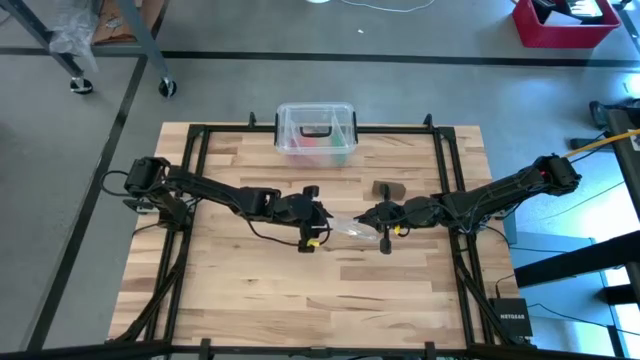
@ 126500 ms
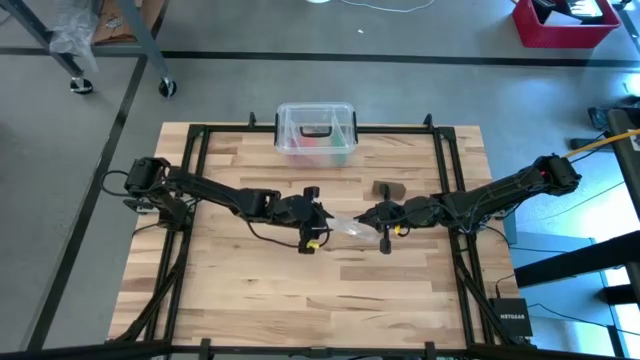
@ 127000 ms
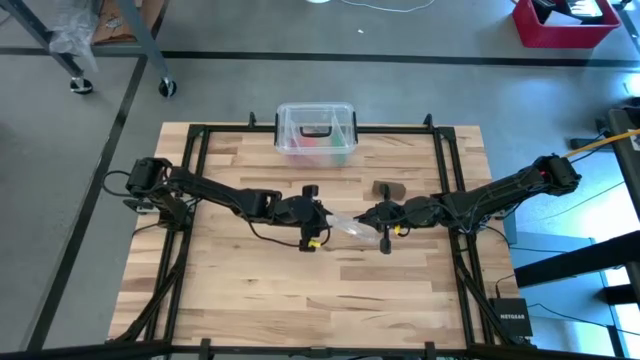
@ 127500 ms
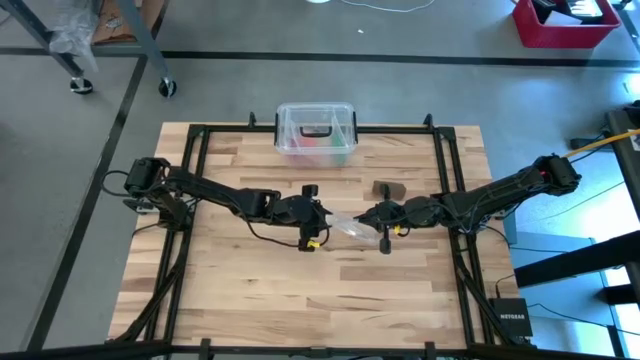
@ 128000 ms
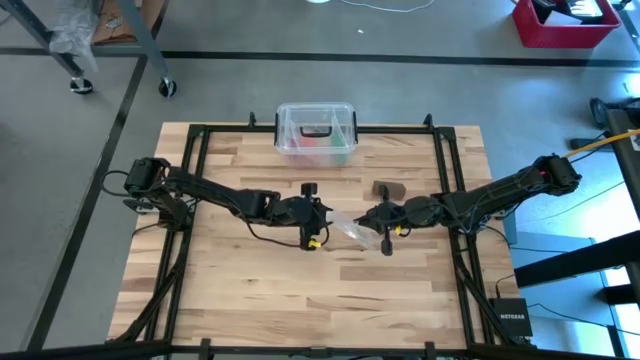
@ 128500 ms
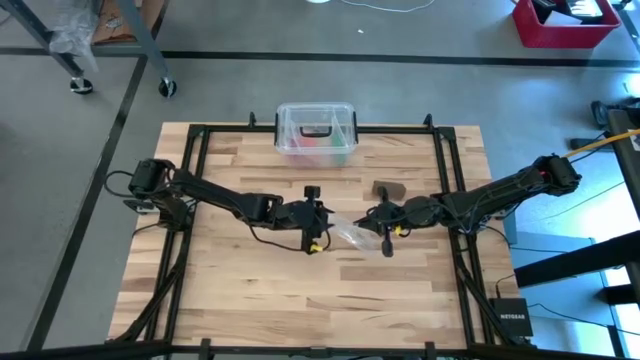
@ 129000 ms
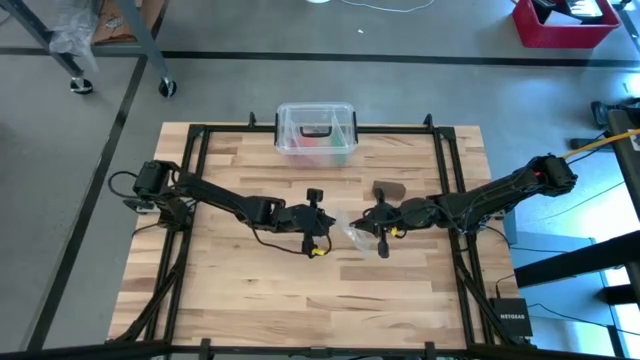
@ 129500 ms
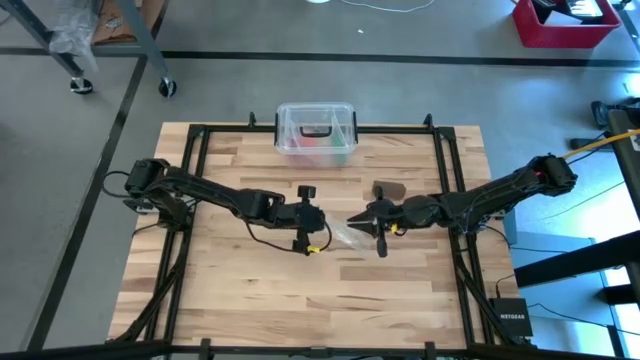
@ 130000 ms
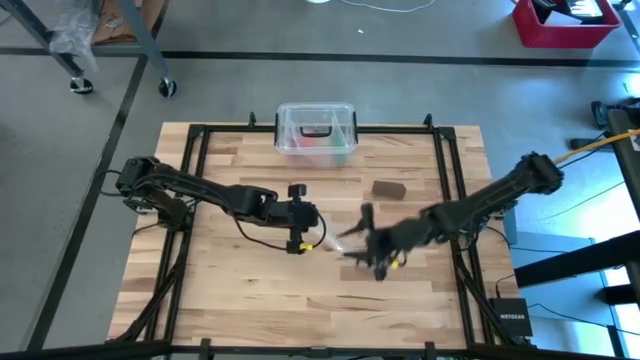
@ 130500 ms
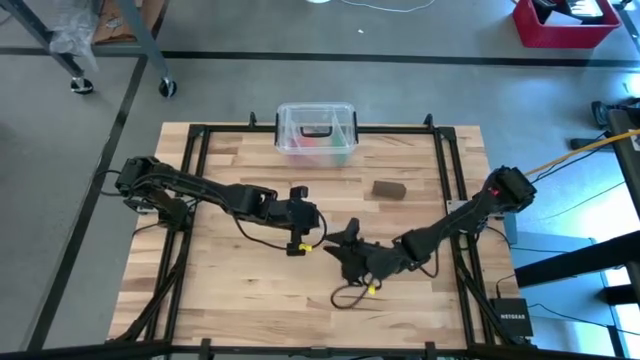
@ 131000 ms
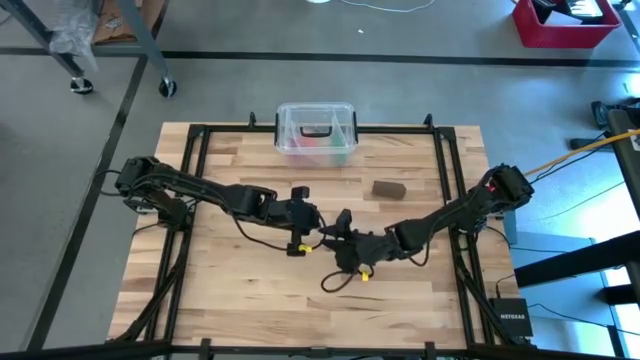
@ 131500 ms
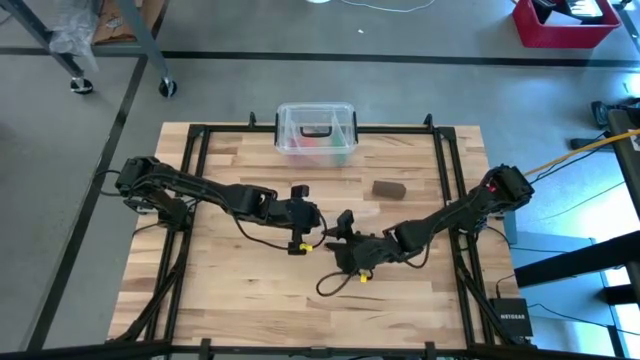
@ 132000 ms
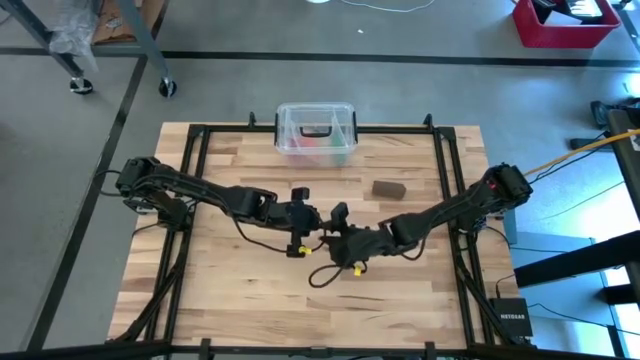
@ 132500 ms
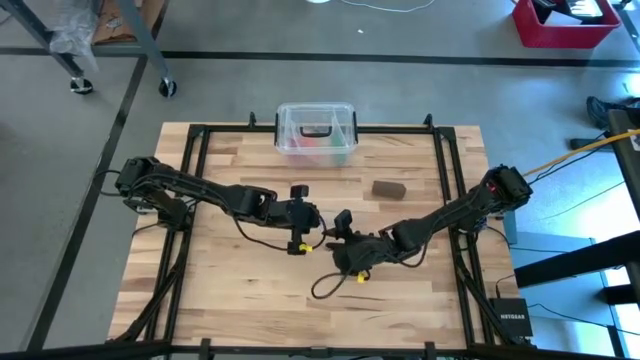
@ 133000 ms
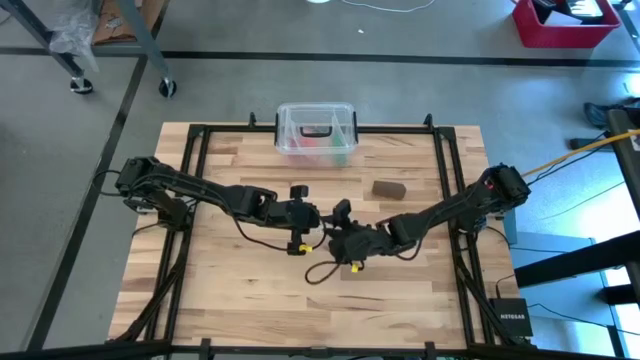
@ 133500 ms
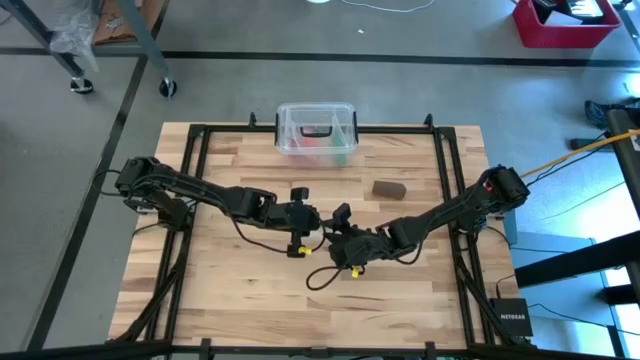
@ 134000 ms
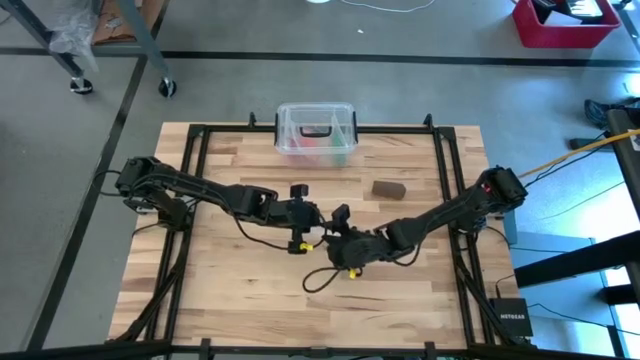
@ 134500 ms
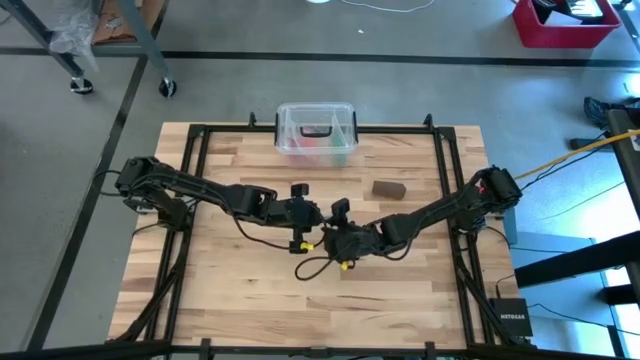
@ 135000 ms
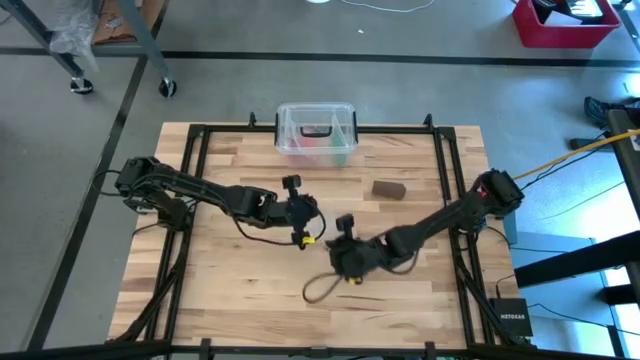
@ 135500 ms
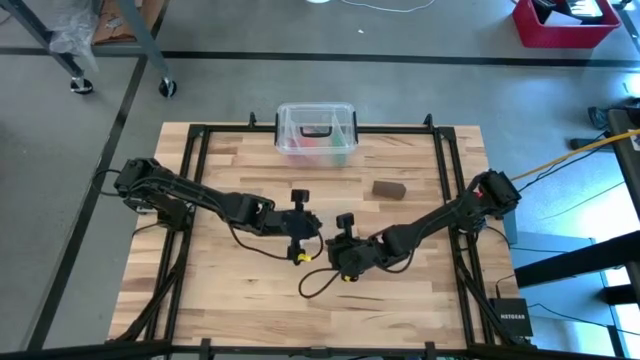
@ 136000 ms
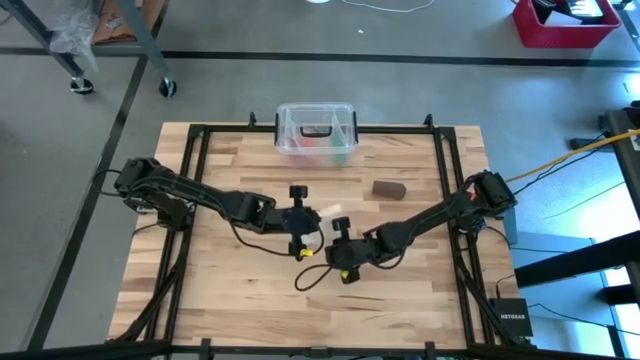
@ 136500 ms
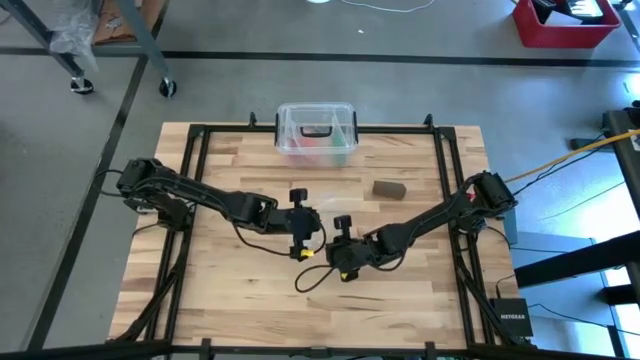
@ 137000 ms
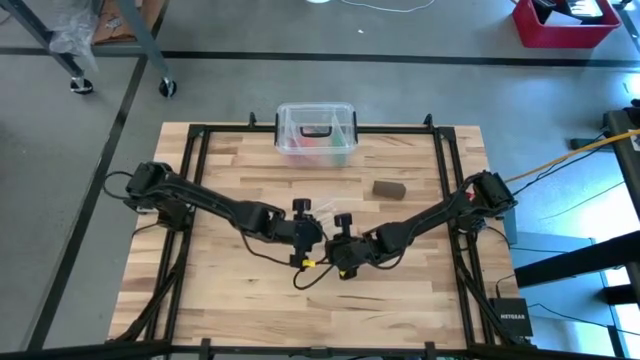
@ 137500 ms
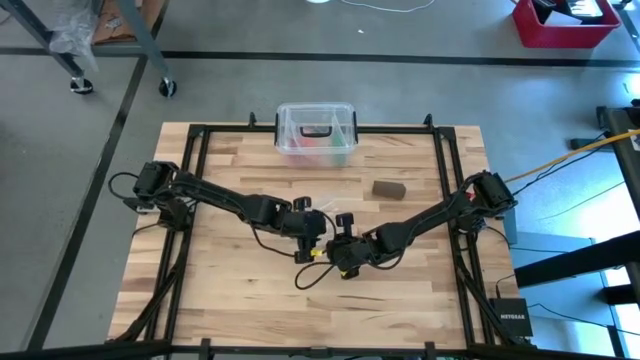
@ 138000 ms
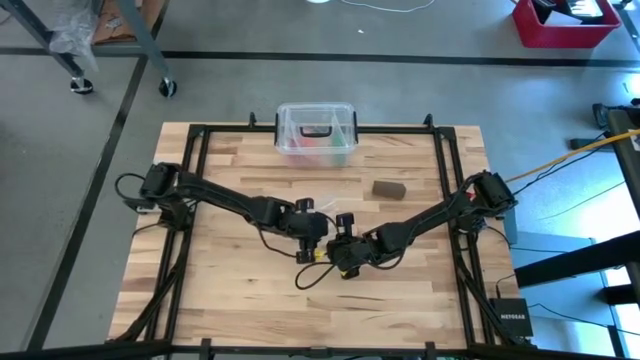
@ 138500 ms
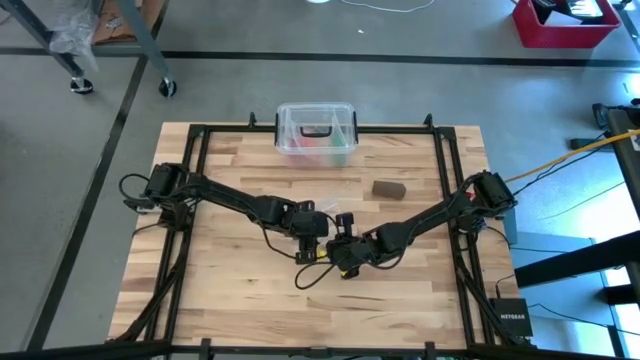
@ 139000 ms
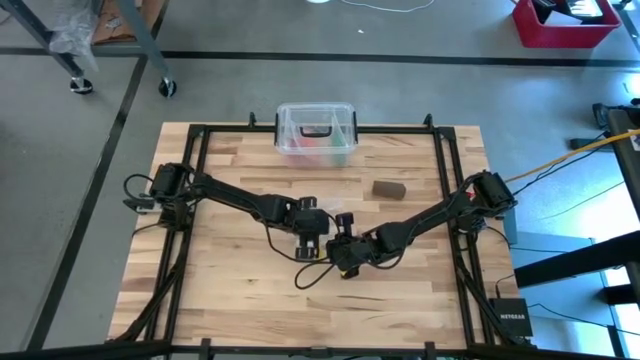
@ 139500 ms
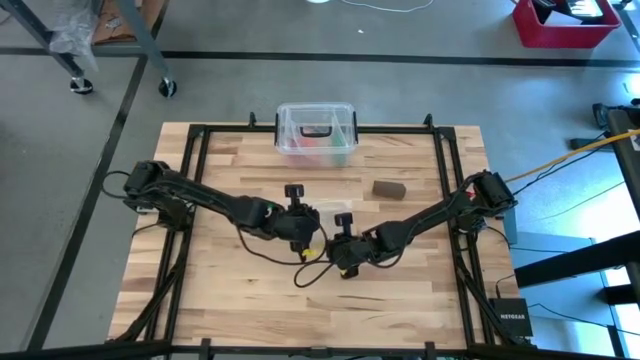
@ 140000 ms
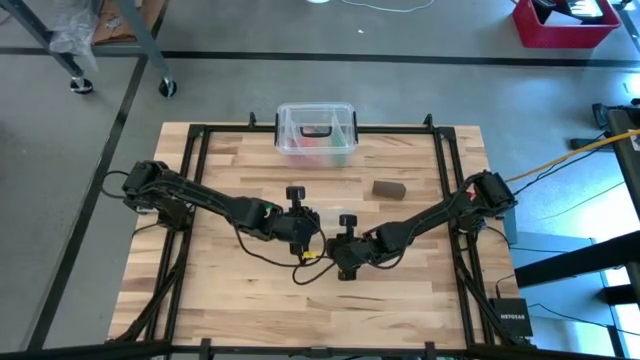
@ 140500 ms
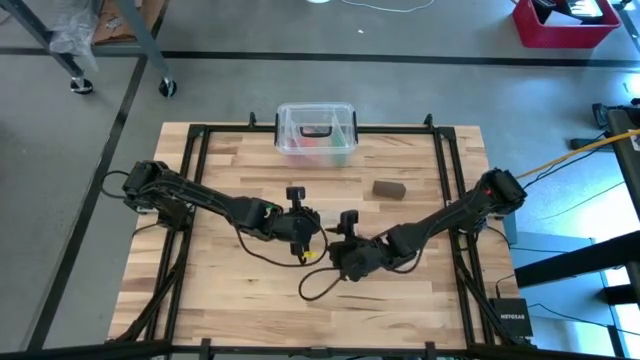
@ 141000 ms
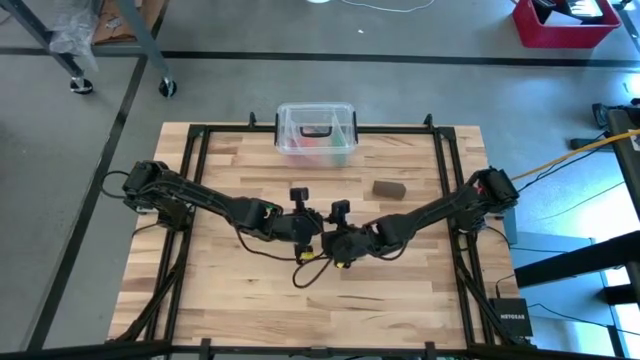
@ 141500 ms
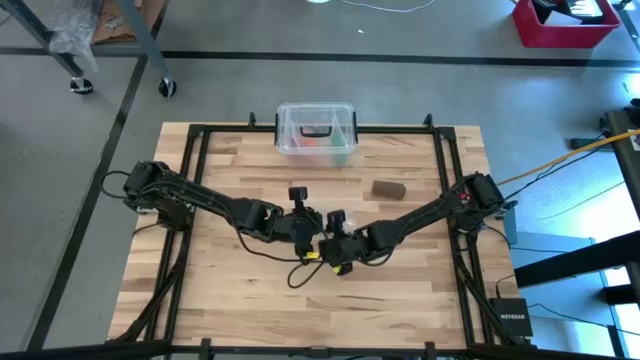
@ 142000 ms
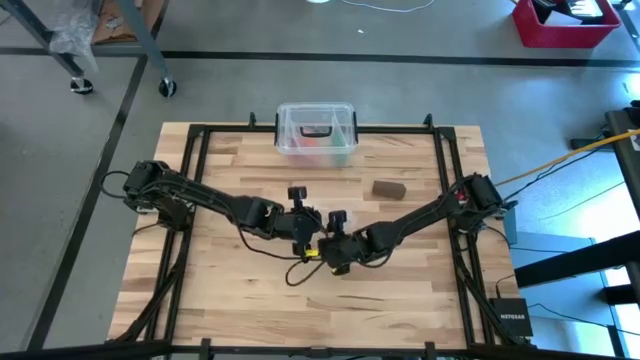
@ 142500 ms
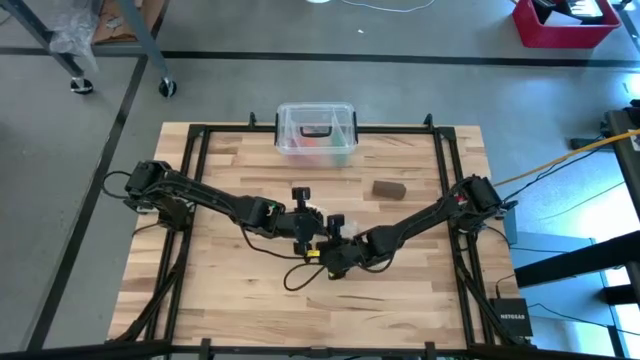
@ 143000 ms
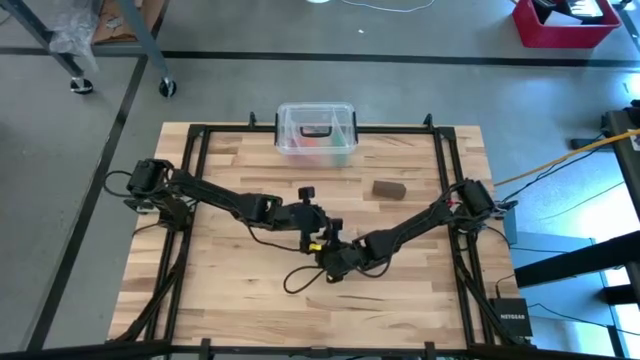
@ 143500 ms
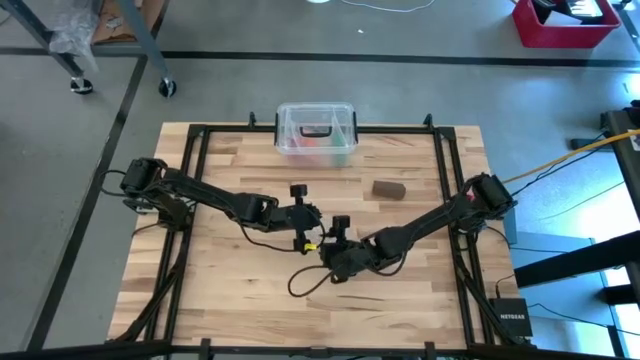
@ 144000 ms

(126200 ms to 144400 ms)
Task: Roll bandage
Open the transparent zip bag

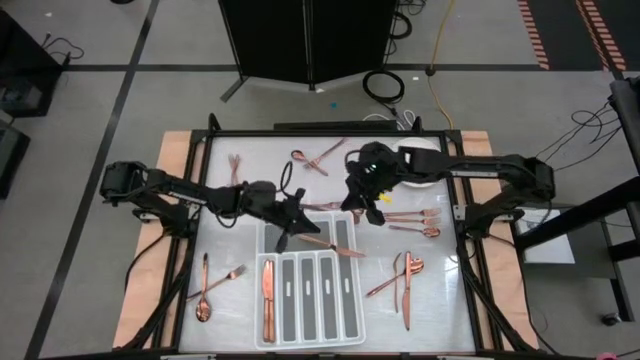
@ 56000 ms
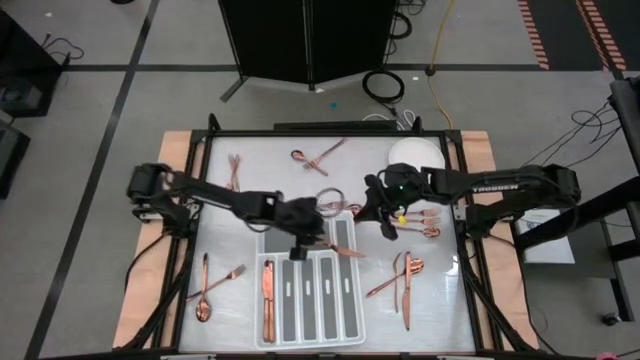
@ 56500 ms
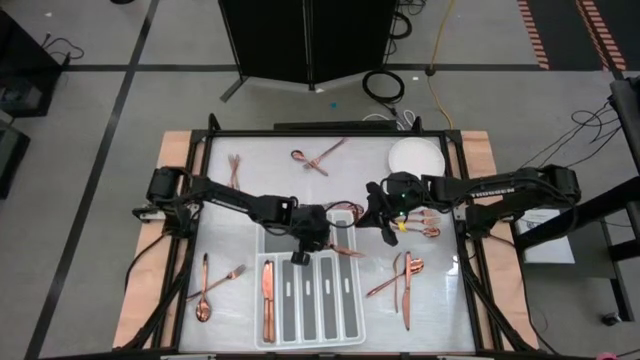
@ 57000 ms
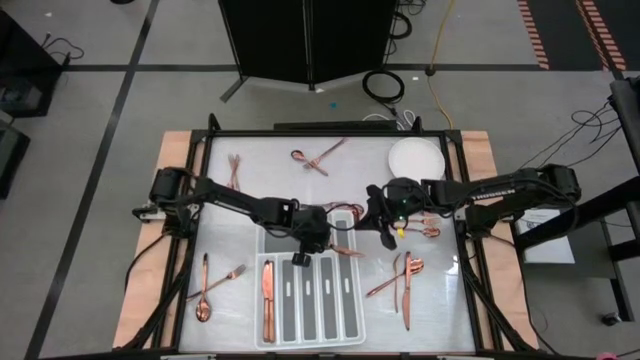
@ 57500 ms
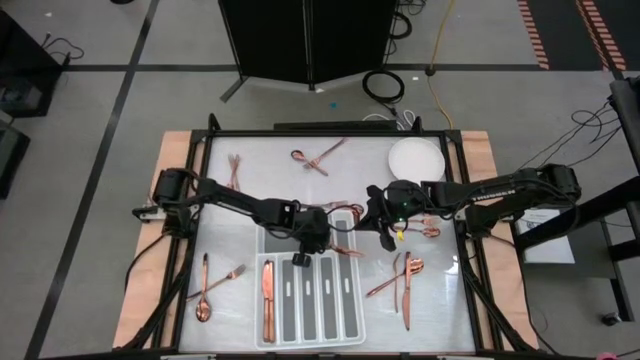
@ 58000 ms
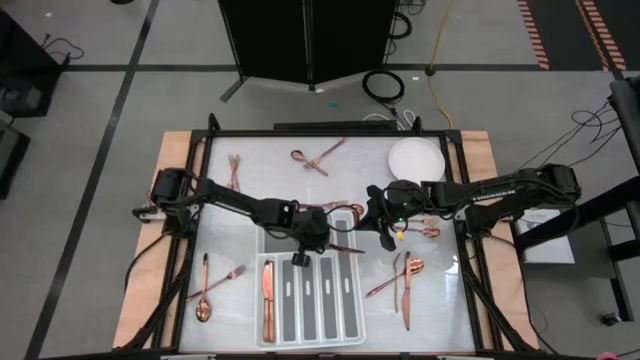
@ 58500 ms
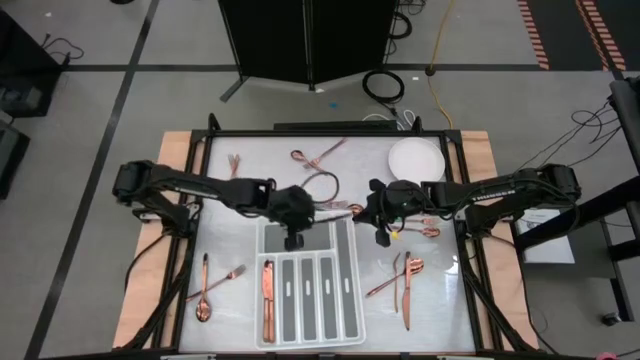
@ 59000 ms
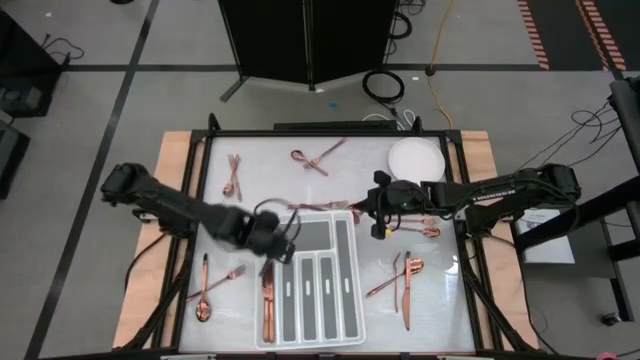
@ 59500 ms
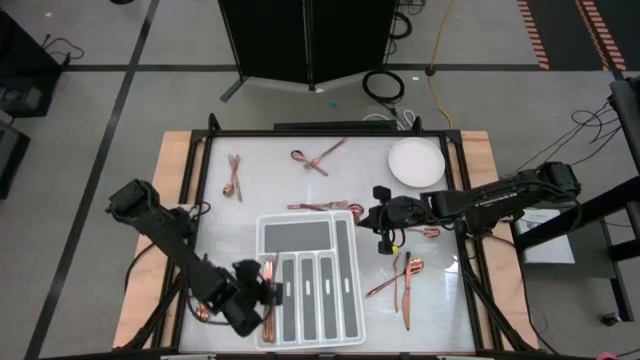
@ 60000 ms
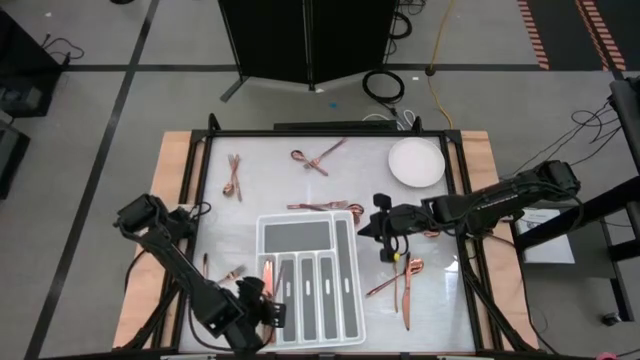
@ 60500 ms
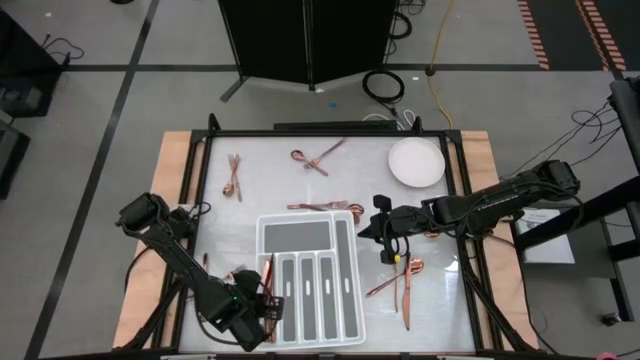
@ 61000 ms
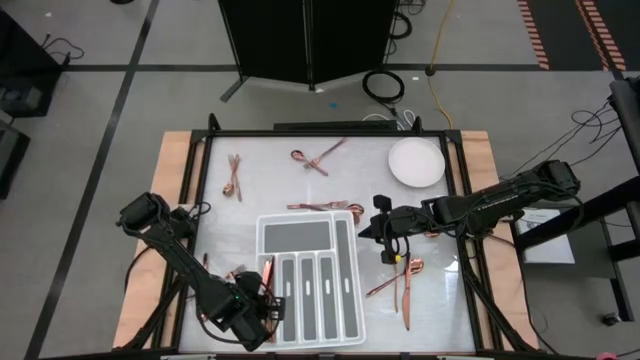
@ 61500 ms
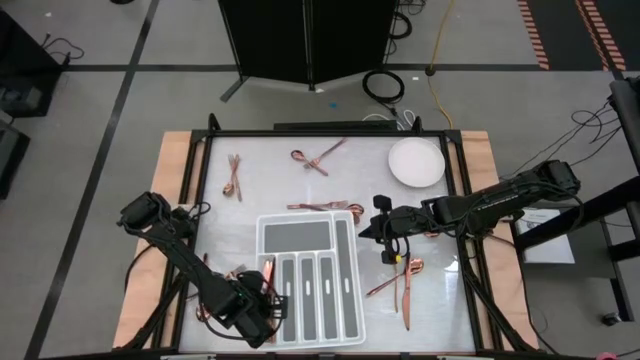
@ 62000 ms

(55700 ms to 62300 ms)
Task: Sort silverware
Put the top knife into the silverware tray
